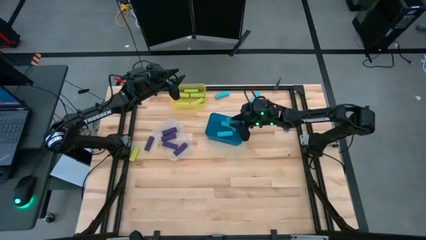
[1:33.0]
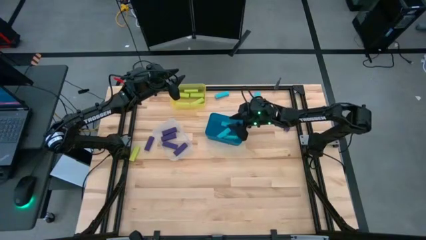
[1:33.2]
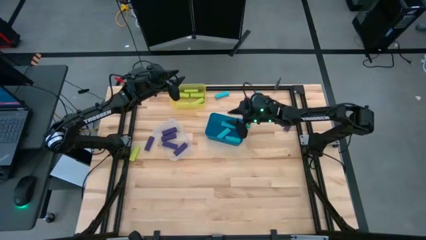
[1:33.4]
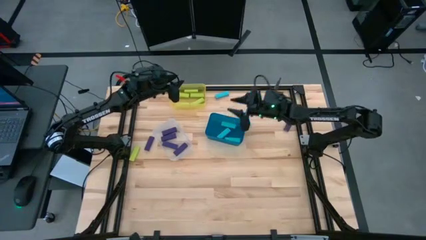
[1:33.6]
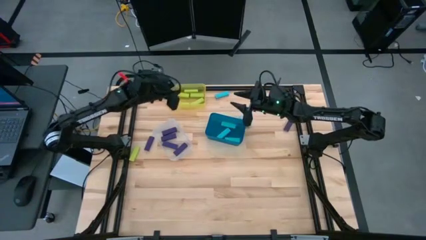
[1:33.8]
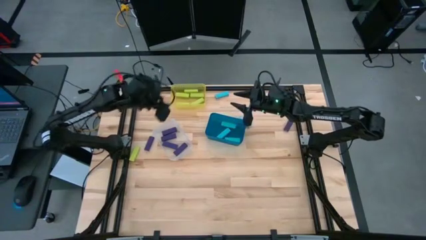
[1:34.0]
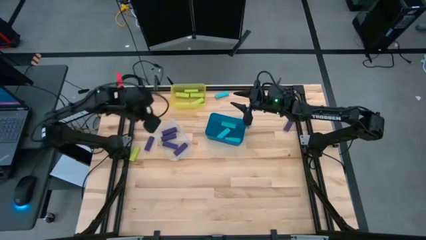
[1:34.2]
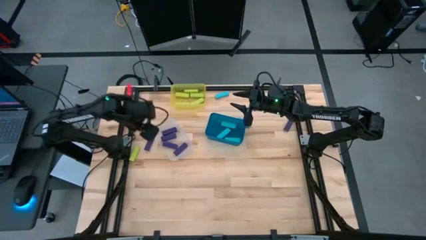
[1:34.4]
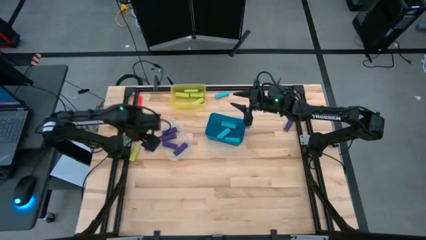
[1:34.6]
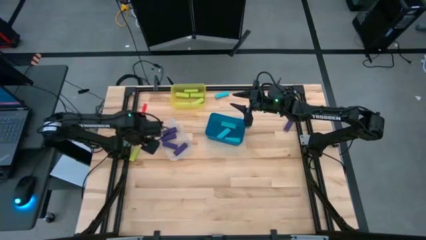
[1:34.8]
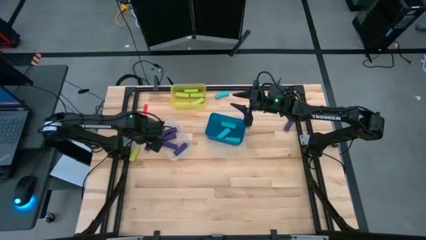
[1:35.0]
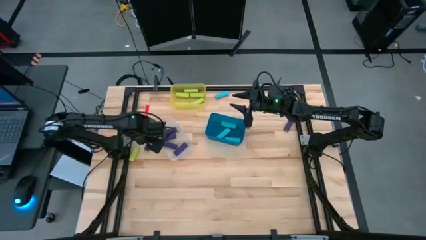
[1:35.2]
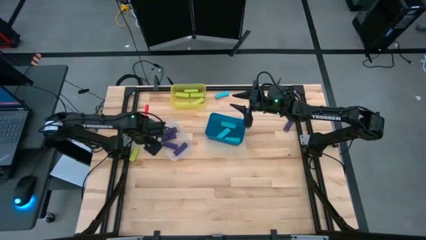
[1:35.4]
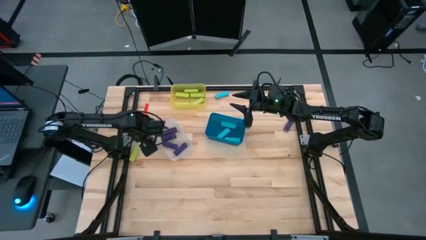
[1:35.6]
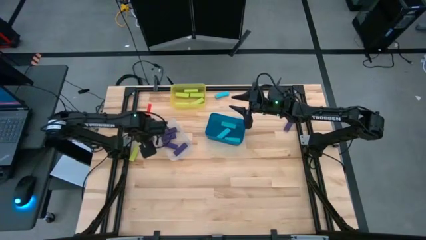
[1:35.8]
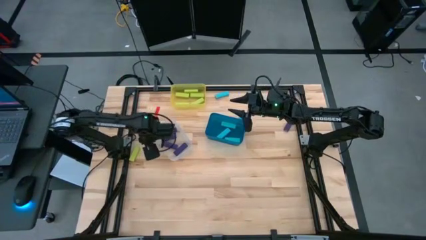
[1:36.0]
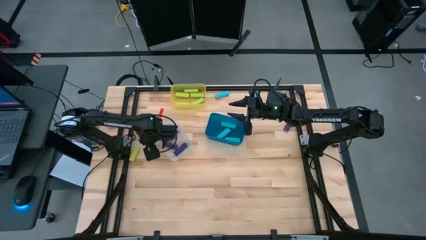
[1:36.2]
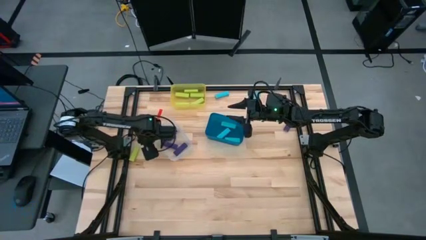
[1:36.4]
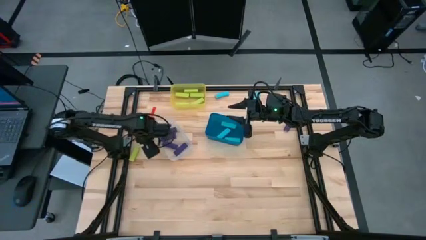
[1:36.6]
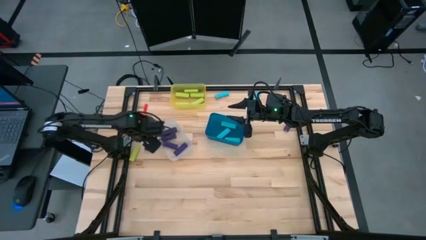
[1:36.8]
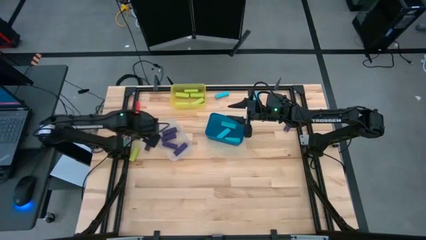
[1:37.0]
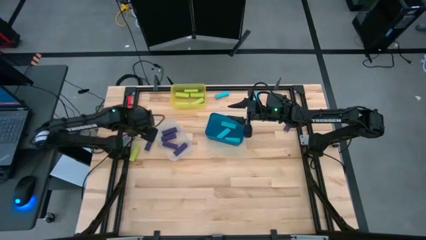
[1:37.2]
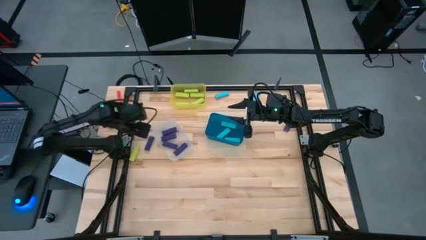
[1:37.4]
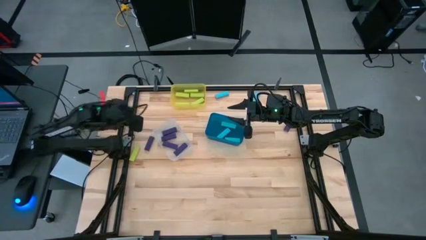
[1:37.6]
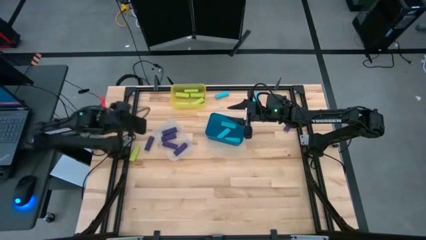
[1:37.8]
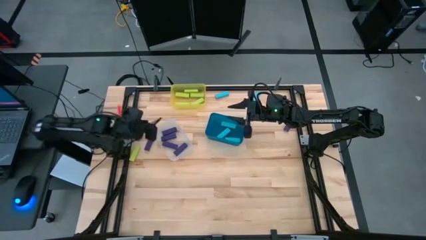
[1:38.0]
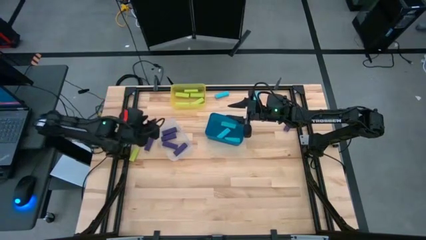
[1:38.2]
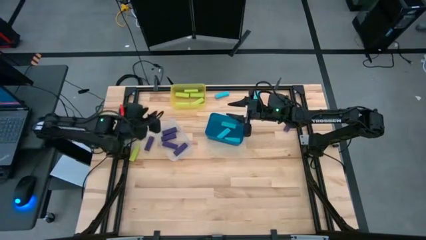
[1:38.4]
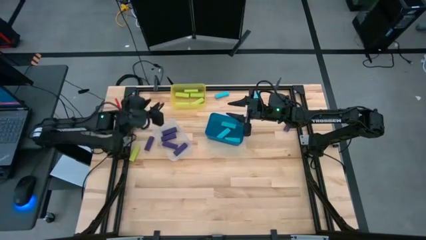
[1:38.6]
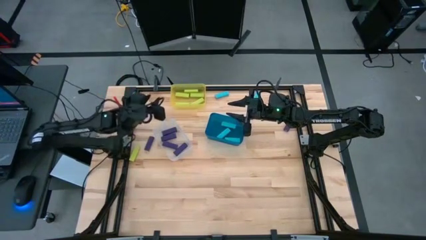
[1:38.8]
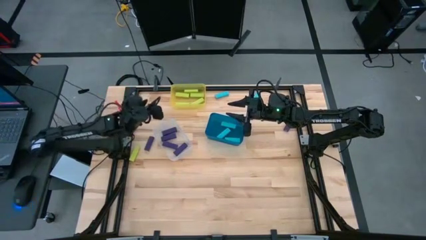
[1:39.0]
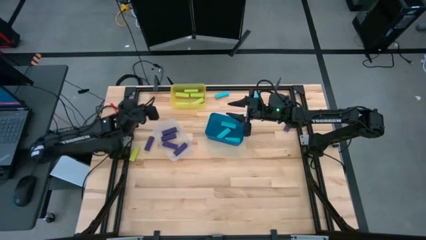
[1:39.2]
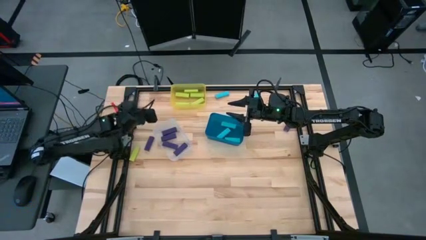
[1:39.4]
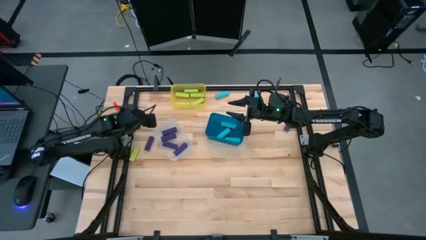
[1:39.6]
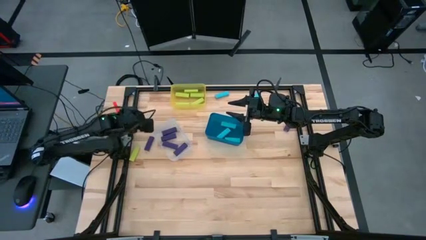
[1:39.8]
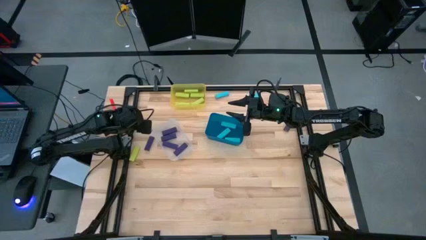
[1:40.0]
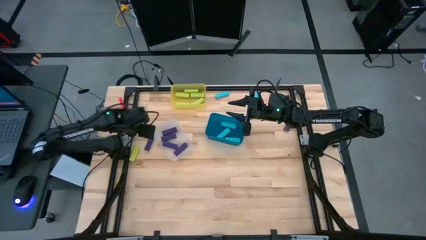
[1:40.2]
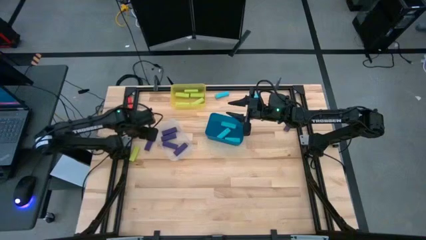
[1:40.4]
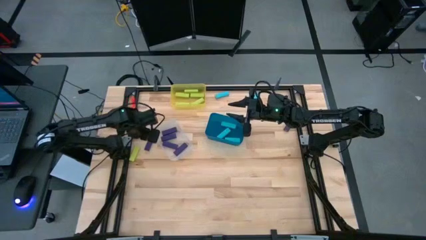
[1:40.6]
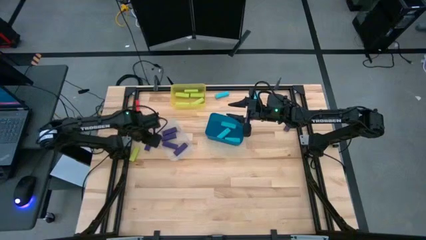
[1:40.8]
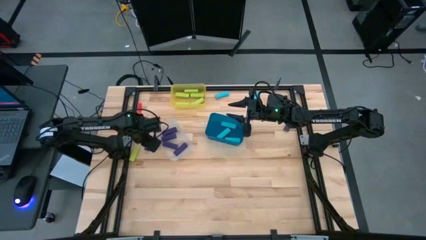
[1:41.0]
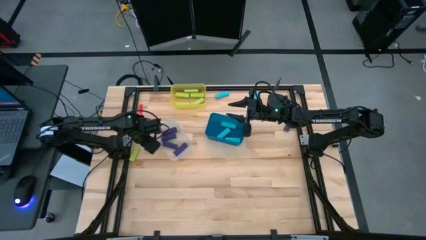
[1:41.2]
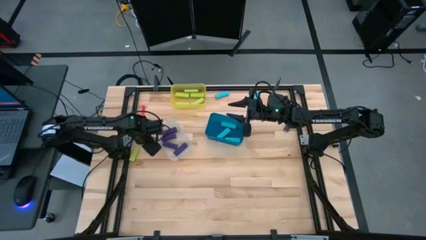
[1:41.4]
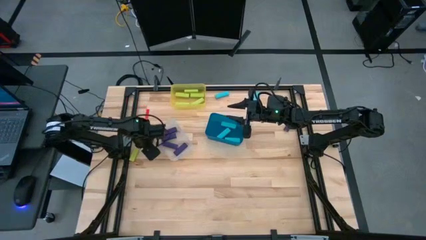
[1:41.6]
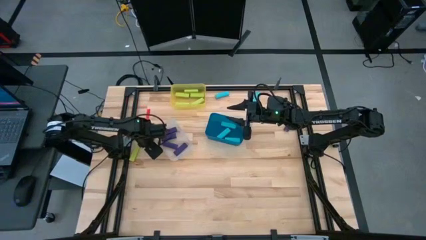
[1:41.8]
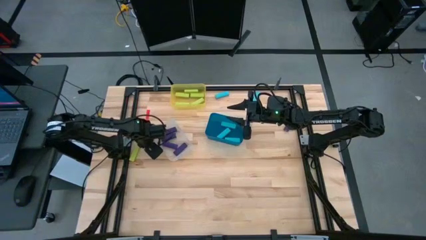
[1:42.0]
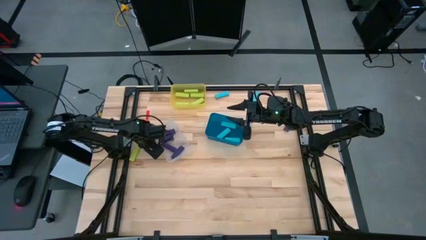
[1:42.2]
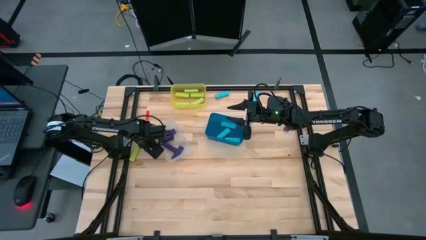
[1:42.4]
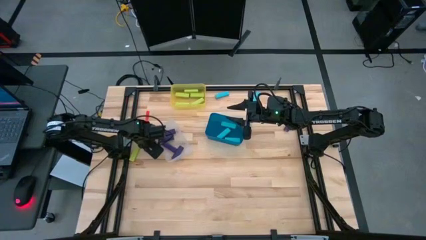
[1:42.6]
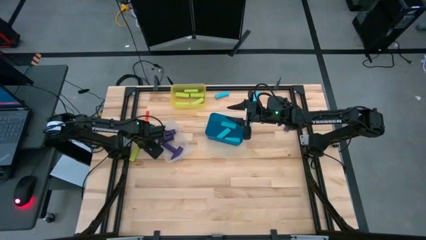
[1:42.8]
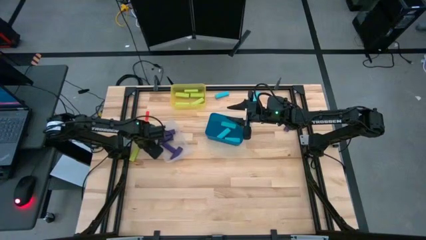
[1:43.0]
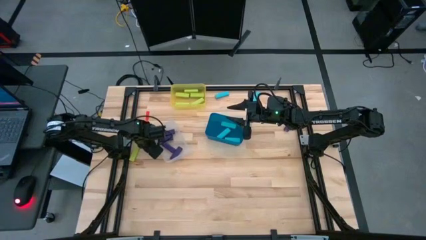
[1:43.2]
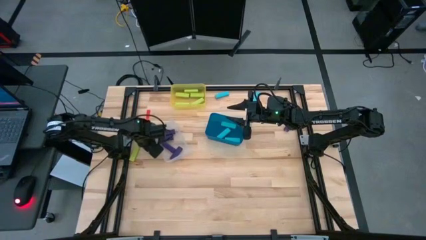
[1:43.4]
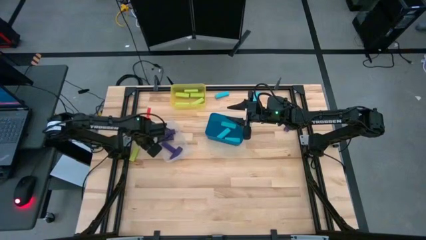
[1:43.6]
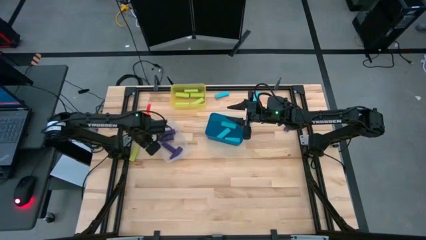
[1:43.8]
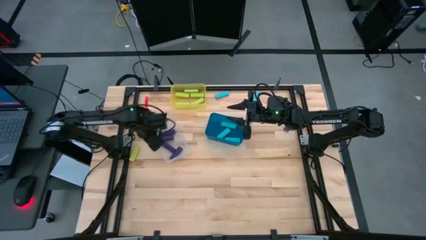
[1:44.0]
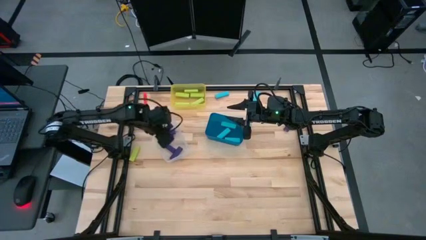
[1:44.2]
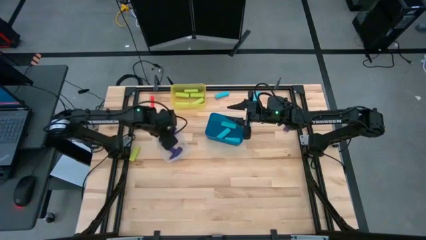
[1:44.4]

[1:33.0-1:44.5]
Task: Sort blocks
Put the violet block into the transparent bin

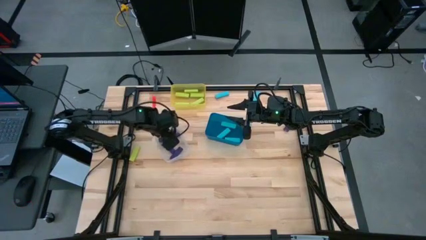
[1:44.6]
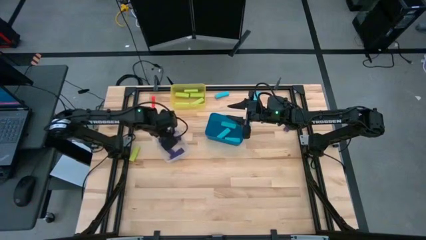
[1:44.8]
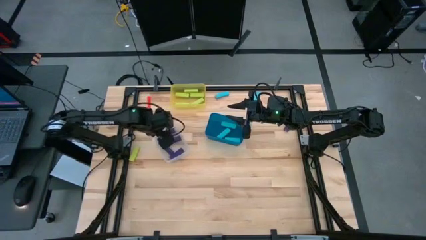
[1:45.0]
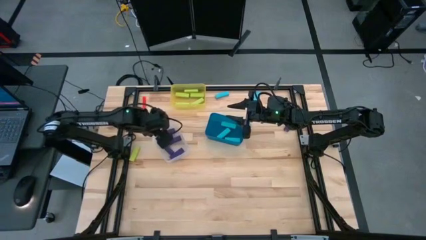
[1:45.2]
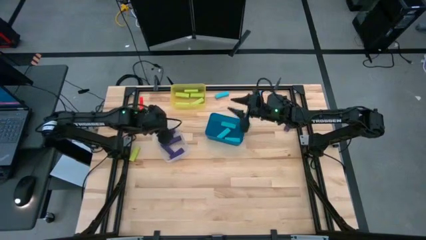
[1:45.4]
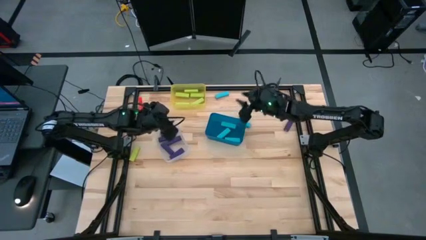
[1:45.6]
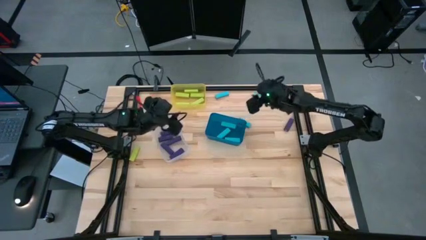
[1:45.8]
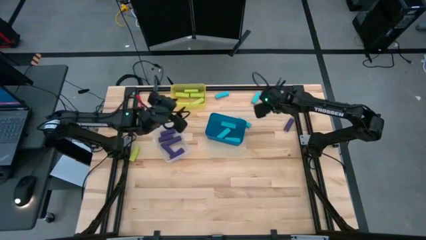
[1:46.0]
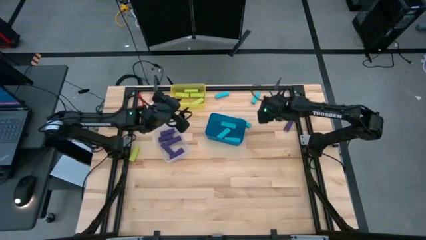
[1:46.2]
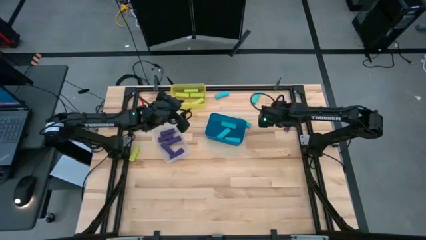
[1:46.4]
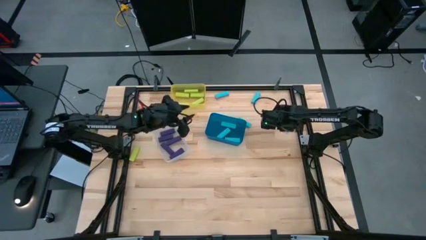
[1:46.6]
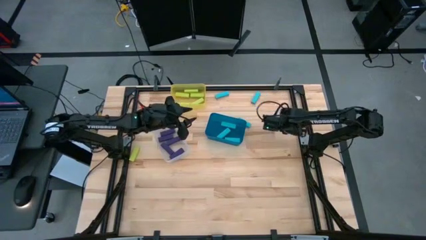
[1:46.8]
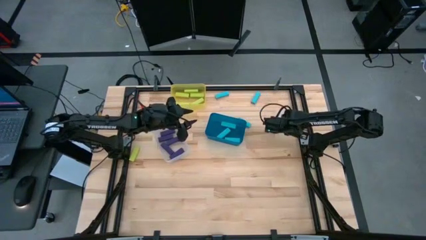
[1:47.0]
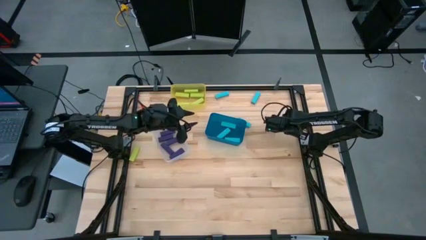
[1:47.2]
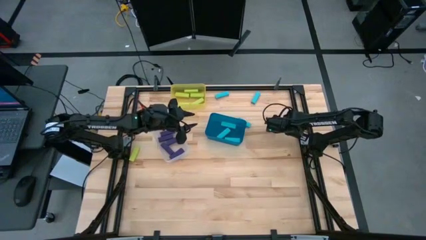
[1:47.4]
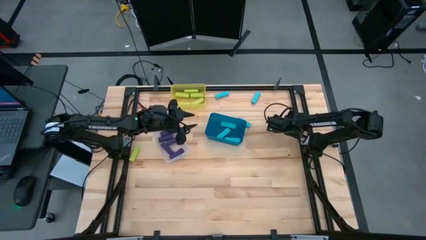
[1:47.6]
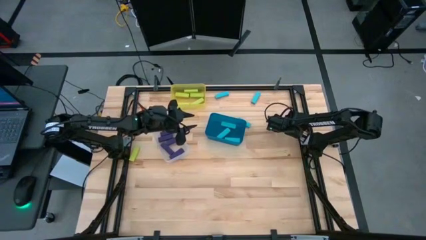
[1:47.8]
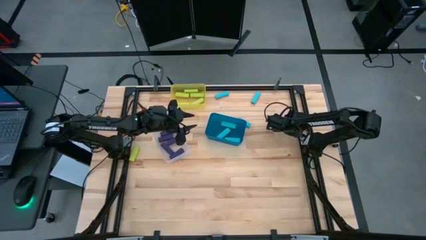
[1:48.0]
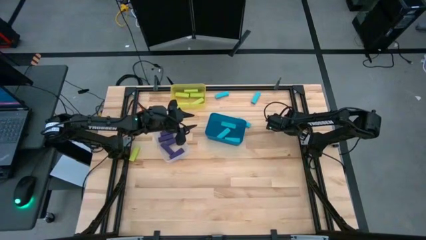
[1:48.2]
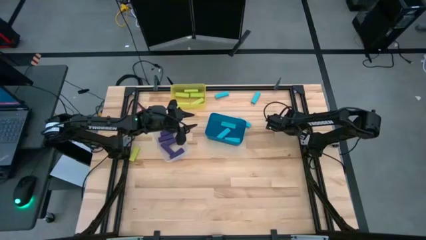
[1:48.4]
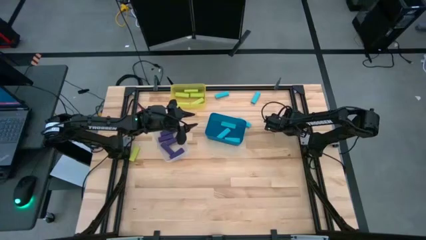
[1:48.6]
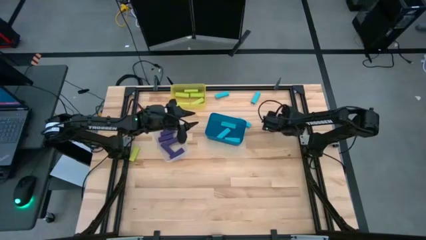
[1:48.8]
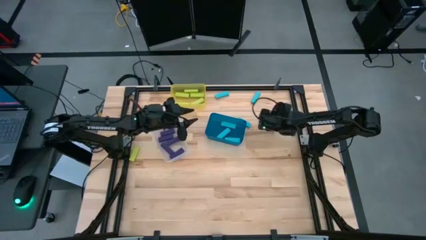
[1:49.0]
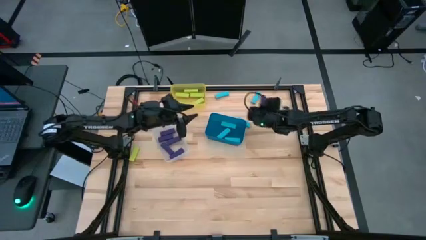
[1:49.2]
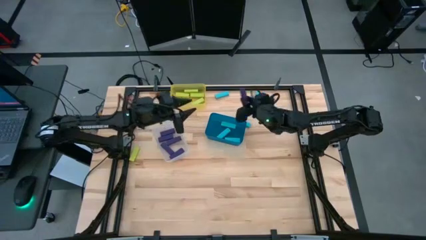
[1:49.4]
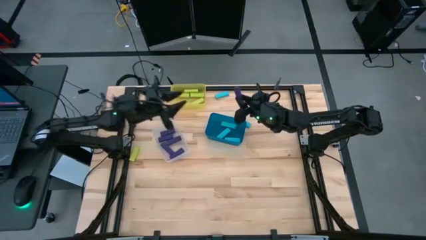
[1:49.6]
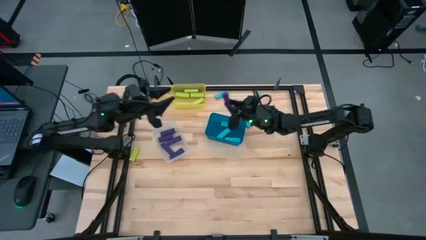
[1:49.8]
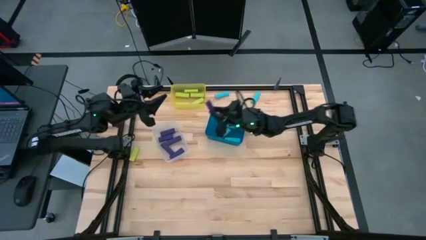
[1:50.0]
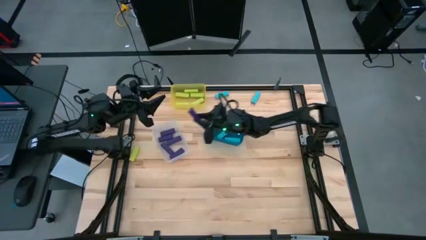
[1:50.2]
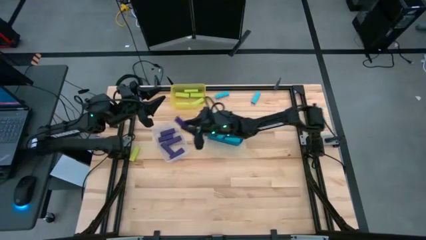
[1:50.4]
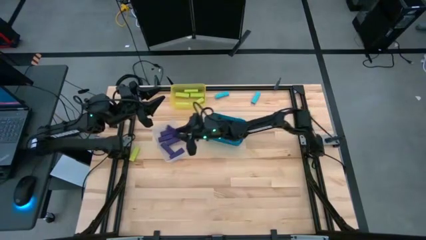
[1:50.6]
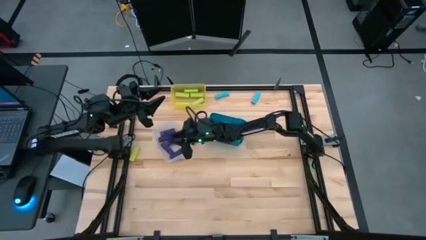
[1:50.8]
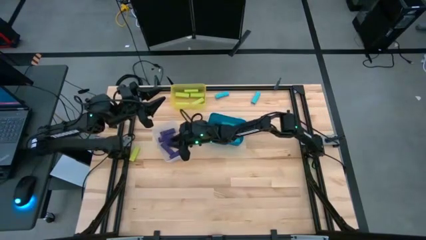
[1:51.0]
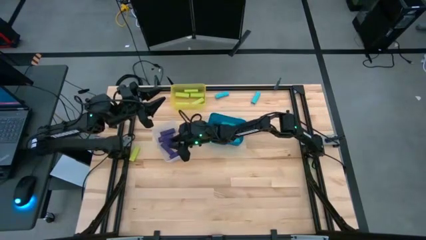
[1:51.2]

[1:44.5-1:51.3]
Put the violet block into the transparent bin
